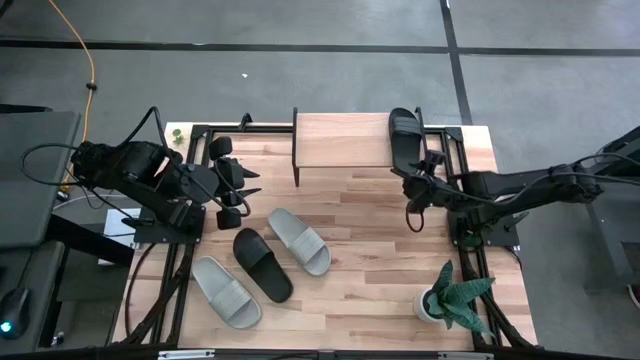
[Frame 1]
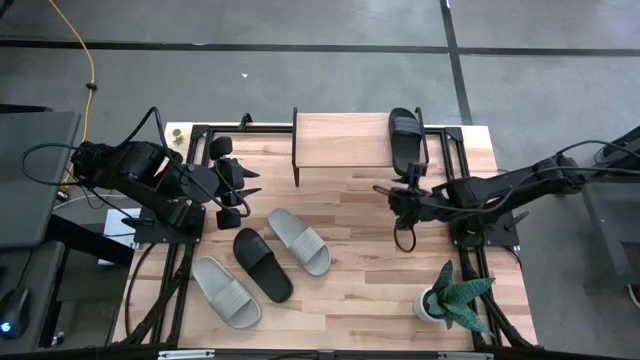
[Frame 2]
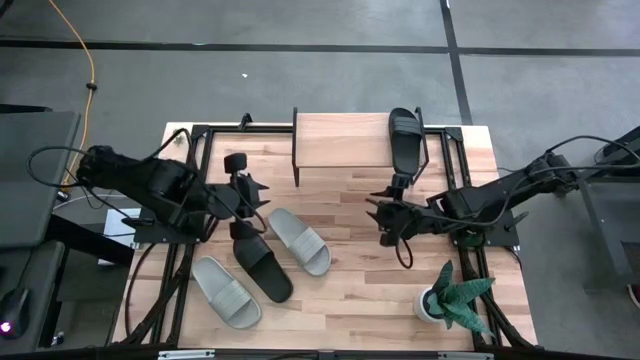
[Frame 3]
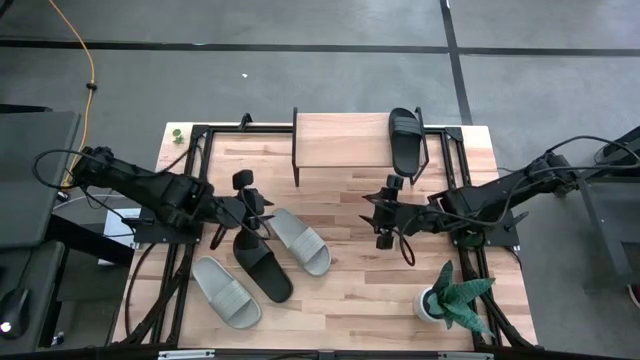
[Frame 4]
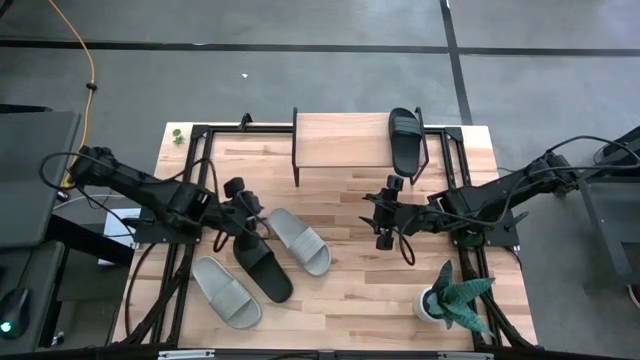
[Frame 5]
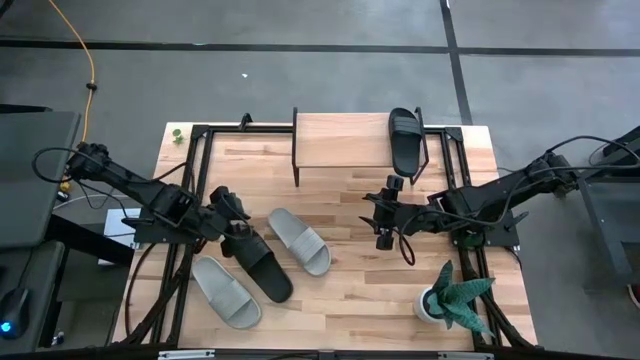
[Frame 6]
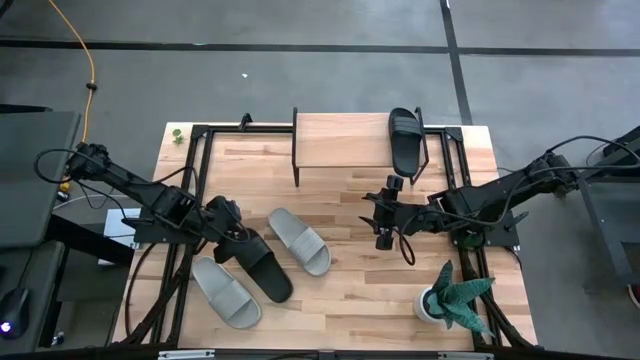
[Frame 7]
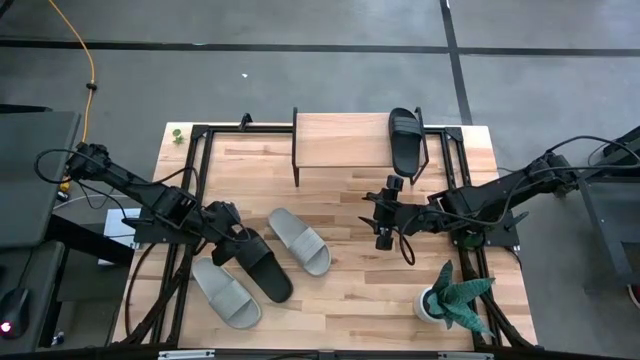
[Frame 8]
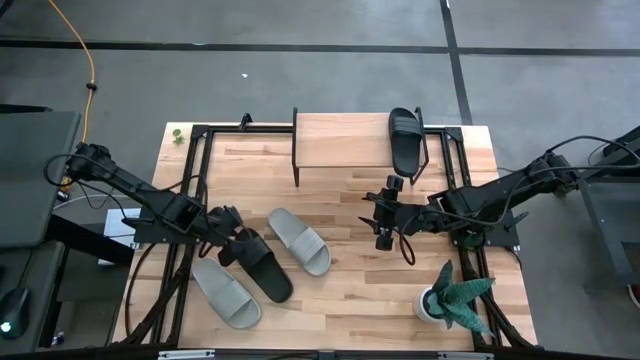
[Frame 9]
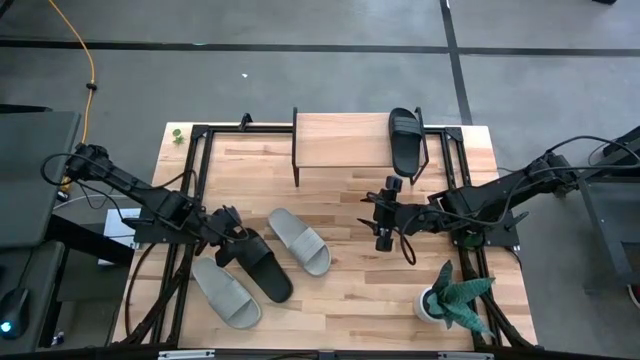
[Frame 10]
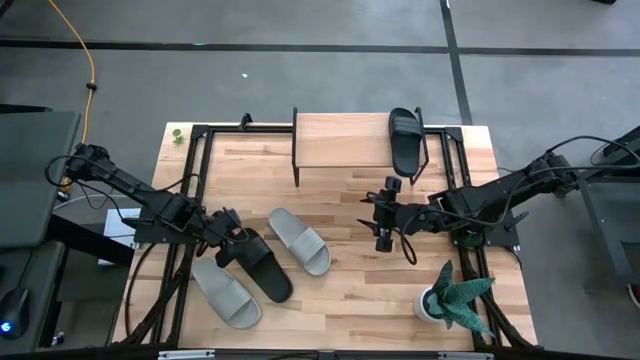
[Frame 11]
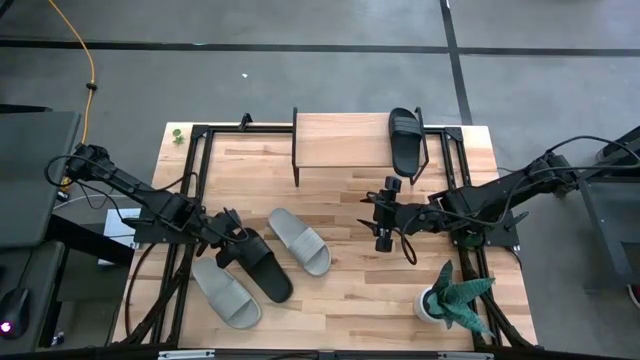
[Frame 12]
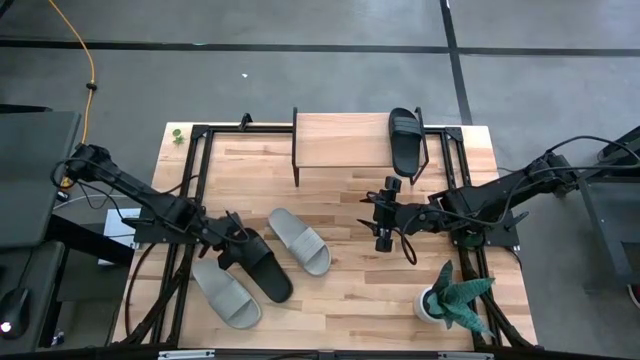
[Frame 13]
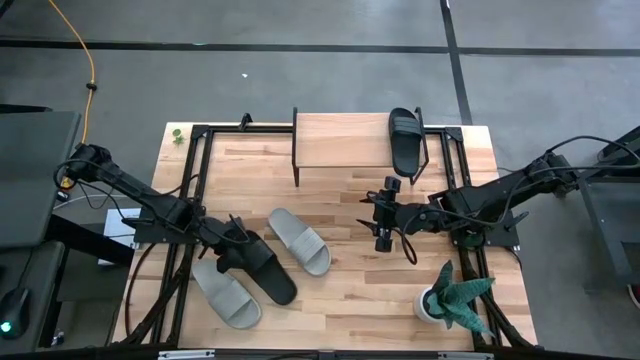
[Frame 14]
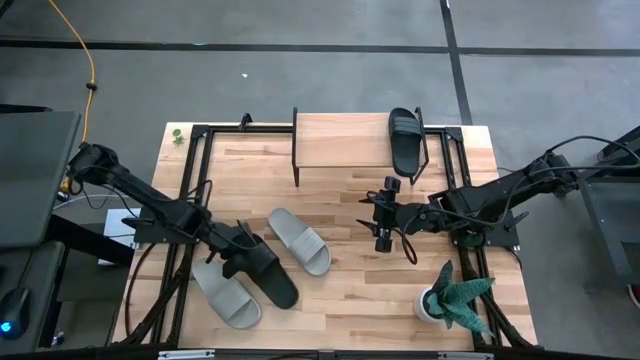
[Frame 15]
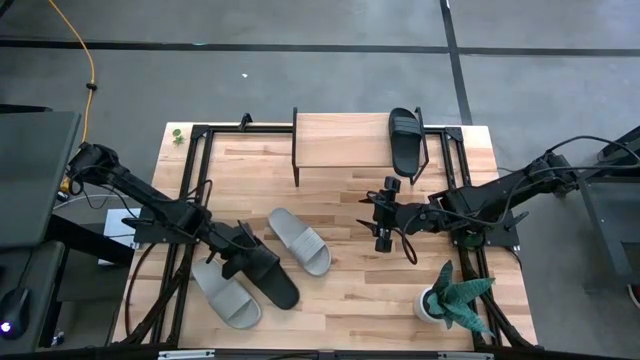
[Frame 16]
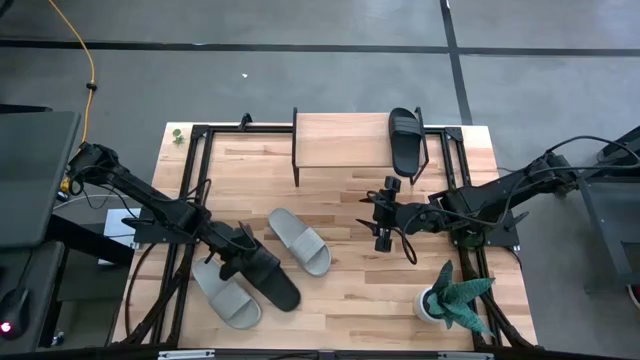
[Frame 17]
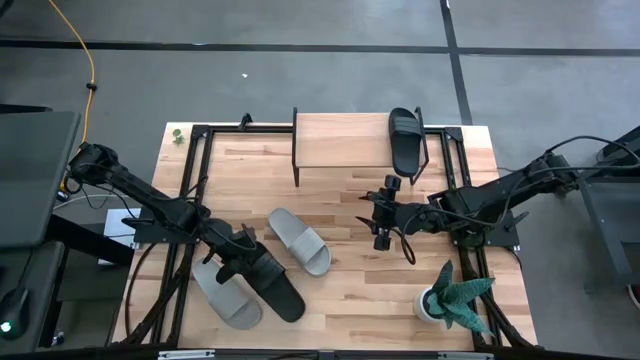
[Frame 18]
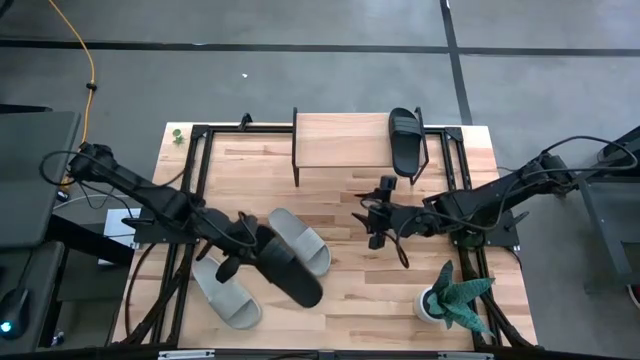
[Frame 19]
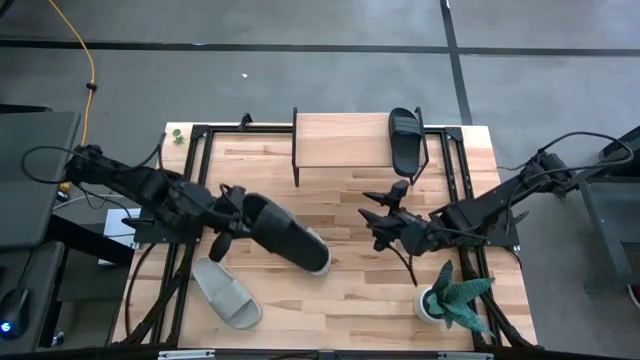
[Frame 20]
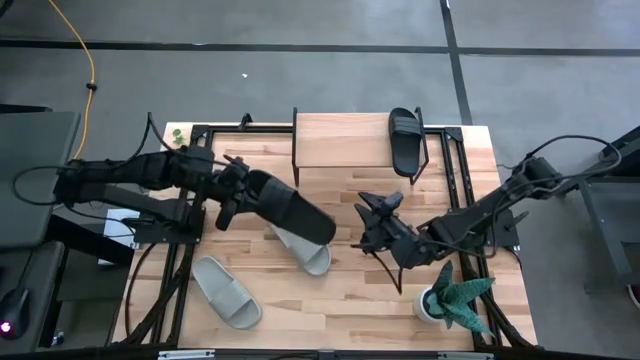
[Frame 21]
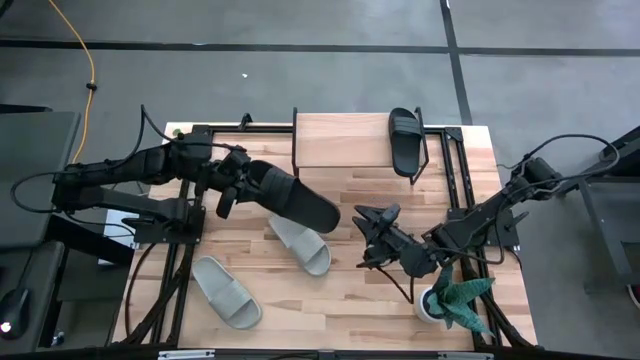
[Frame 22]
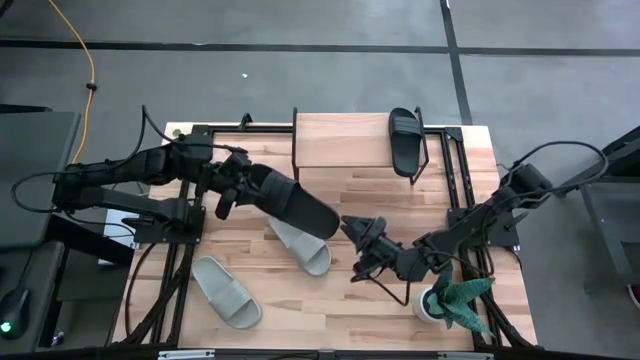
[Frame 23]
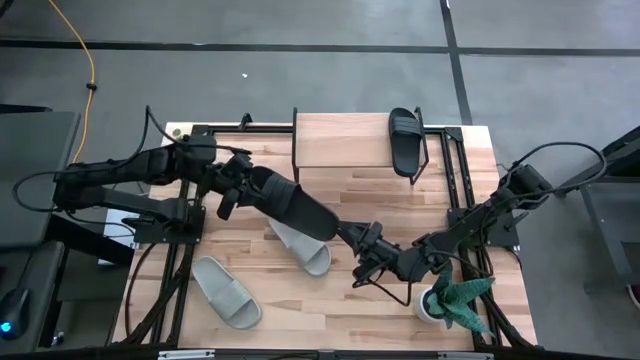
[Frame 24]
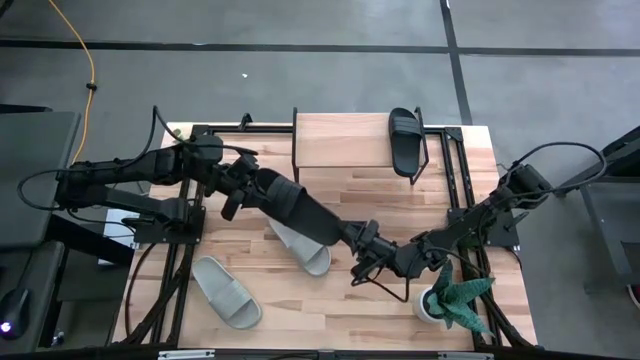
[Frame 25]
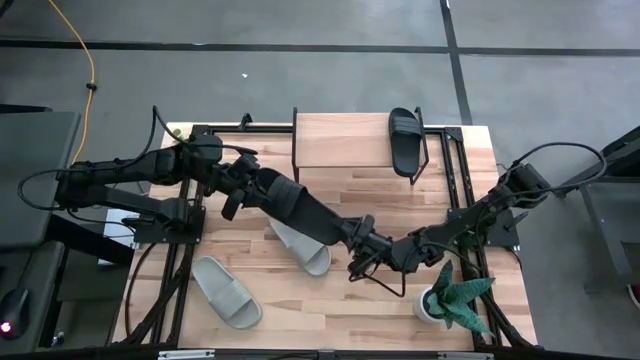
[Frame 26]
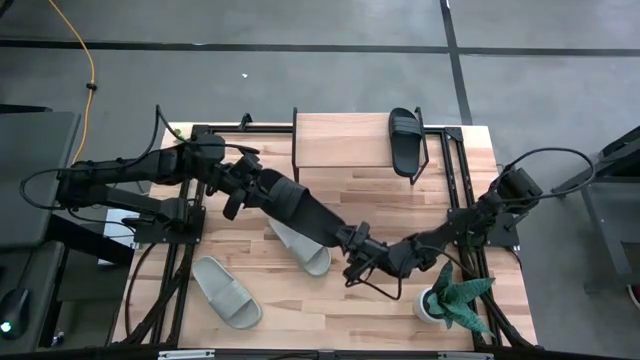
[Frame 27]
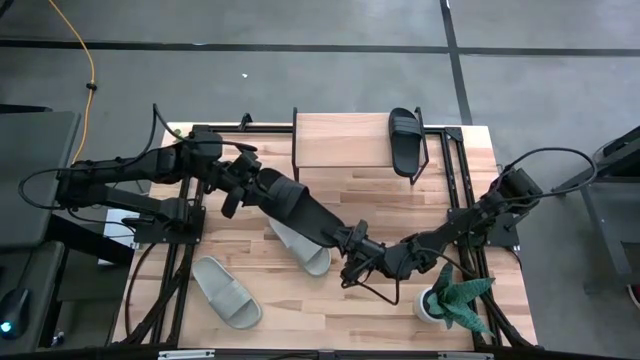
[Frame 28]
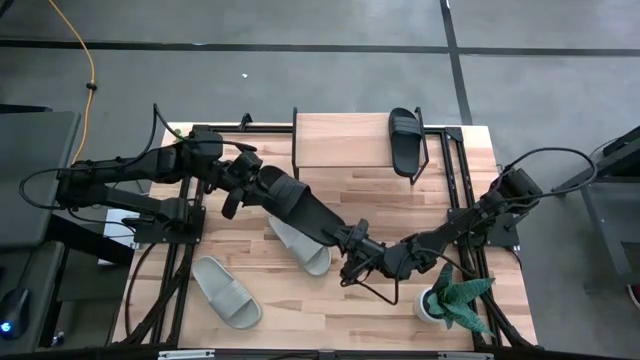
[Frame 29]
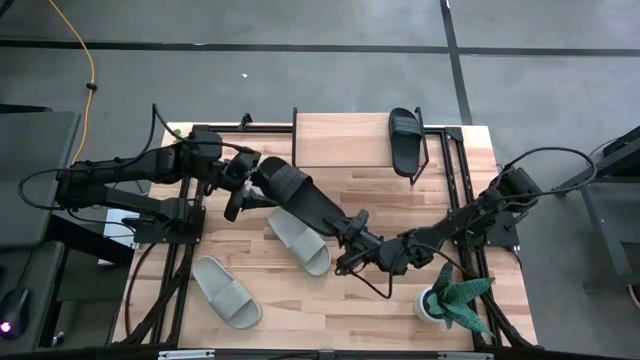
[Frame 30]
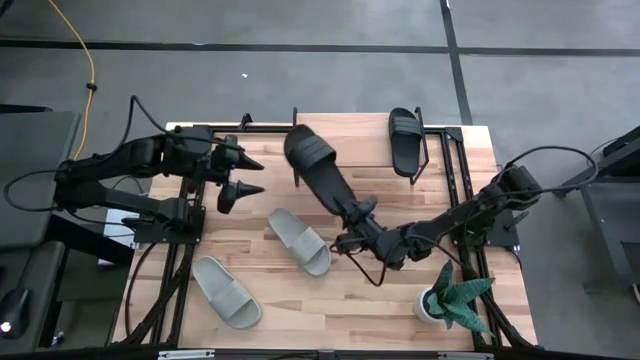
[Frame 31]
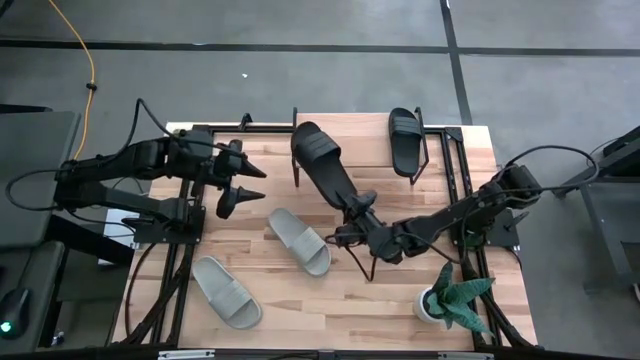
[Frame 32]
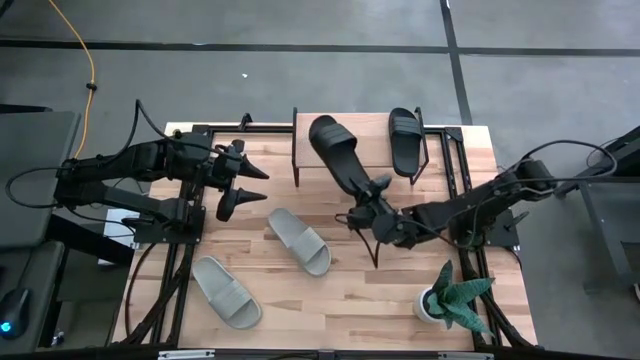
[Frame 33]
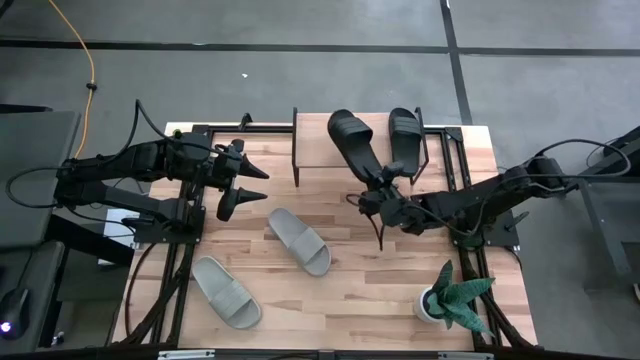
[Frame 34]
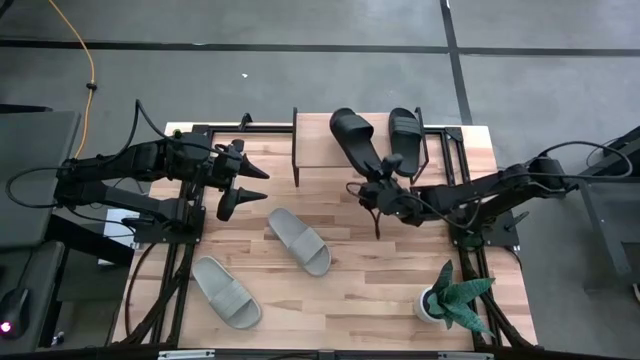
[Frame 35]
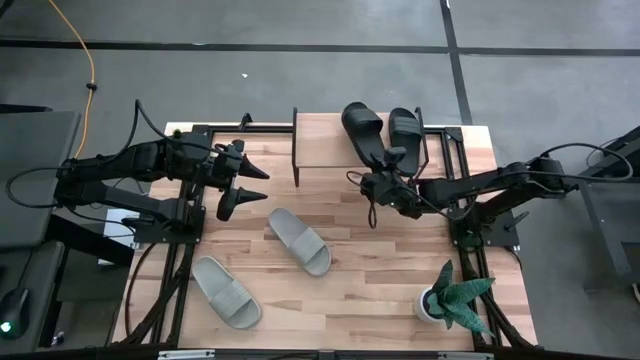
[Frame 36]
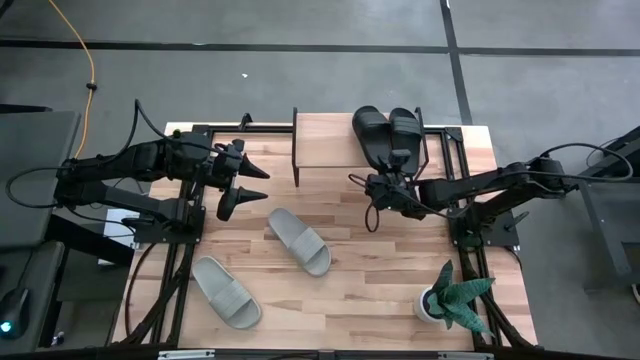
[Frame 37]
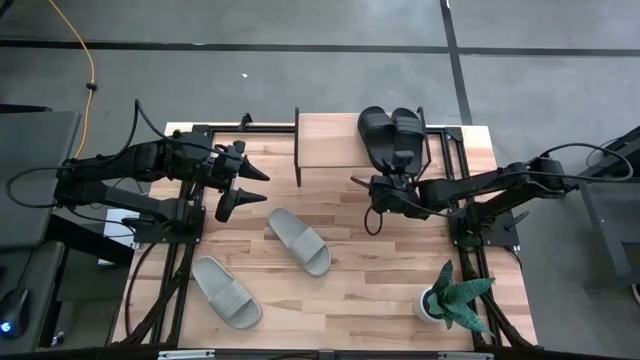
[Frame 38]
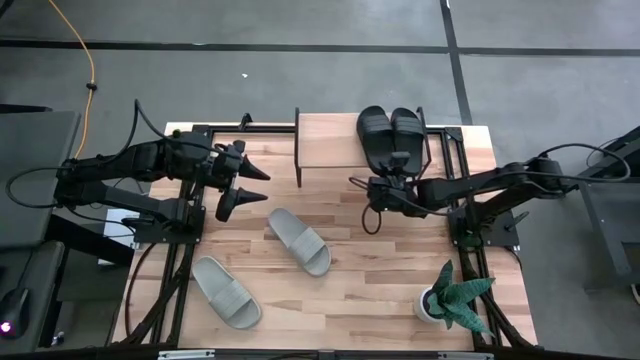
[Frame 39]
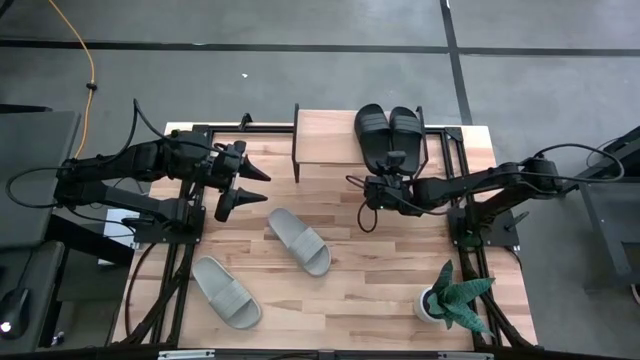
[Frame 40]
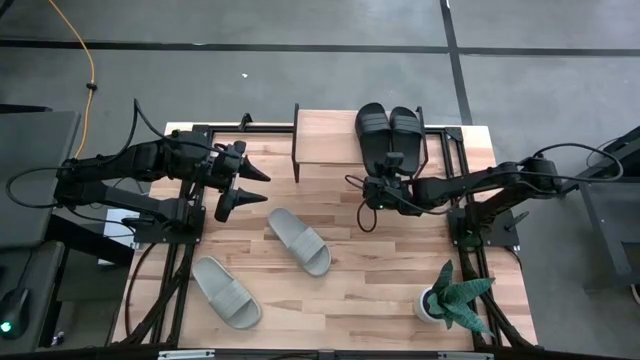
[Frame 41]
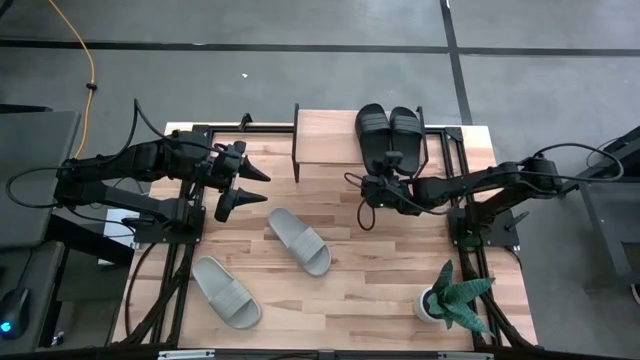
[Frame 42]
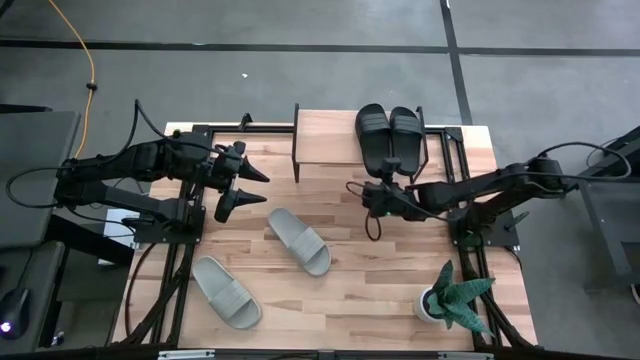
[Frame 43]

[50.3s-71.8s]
Task: Pick and place slides into the shelf
Put the left black slipper on the shelf
